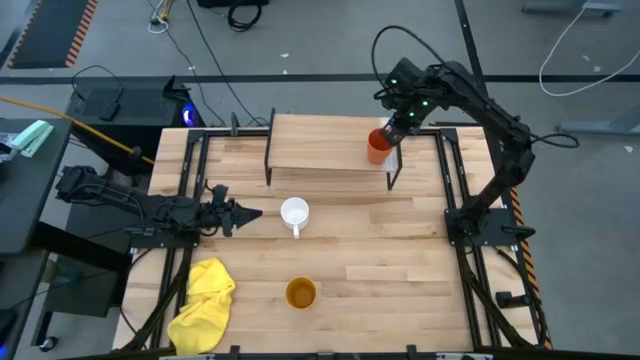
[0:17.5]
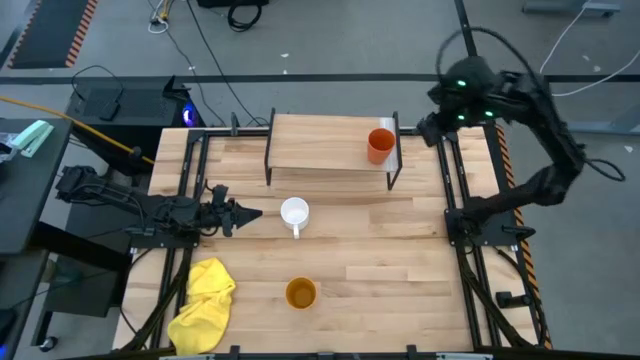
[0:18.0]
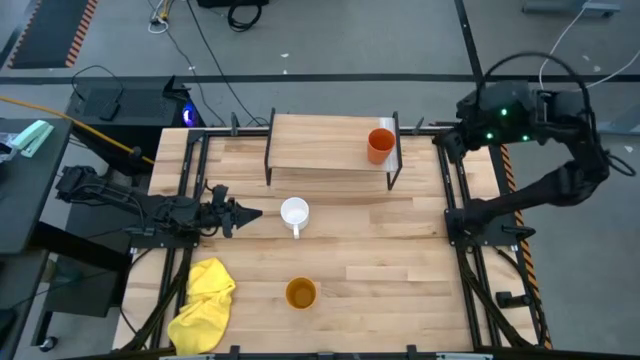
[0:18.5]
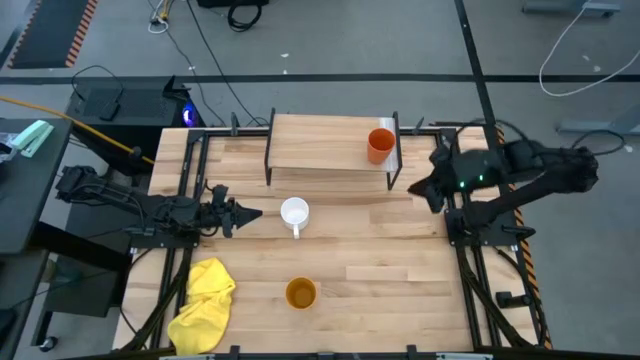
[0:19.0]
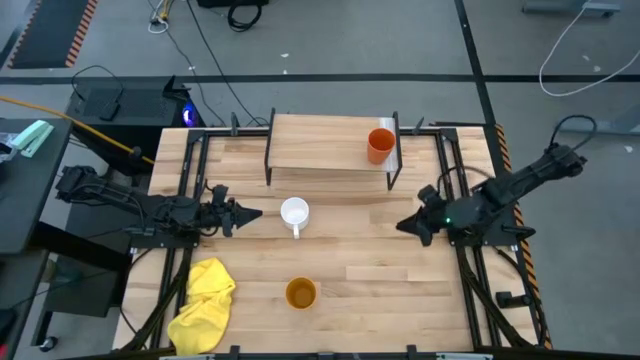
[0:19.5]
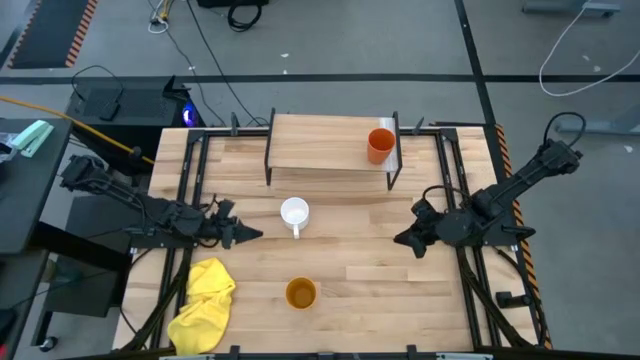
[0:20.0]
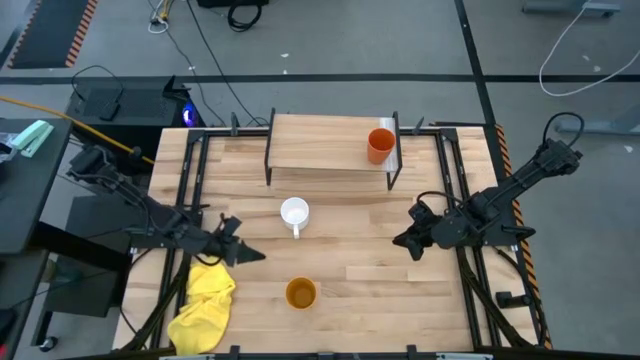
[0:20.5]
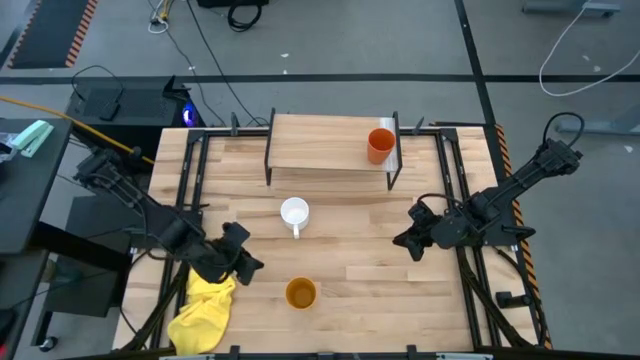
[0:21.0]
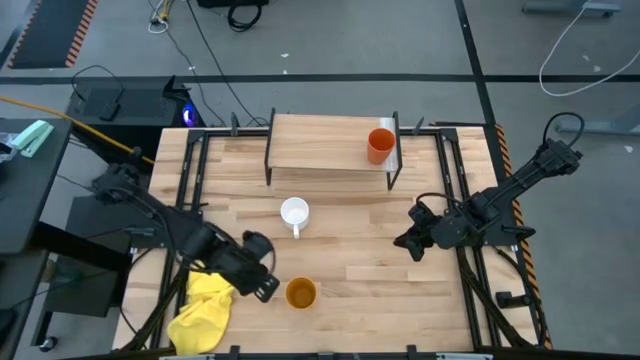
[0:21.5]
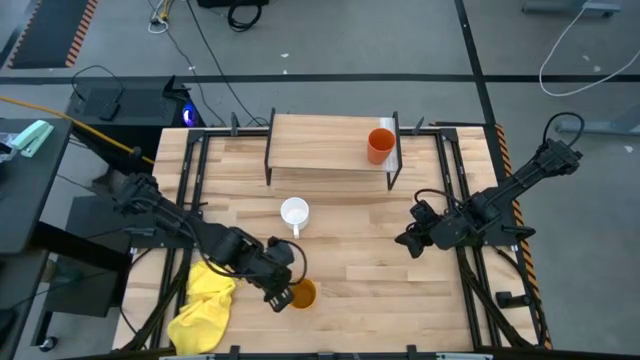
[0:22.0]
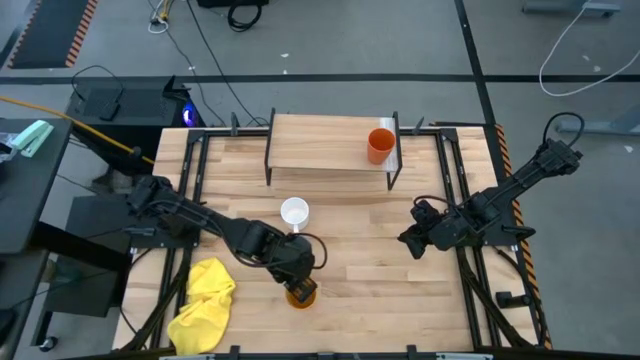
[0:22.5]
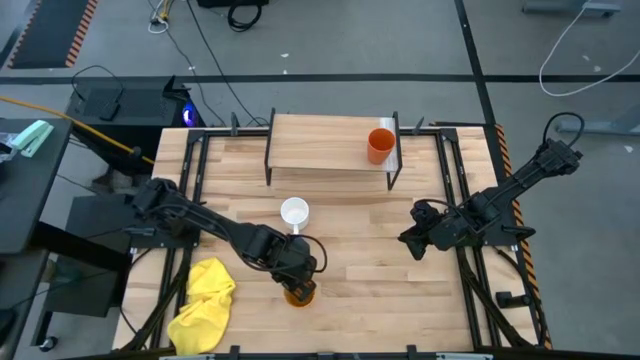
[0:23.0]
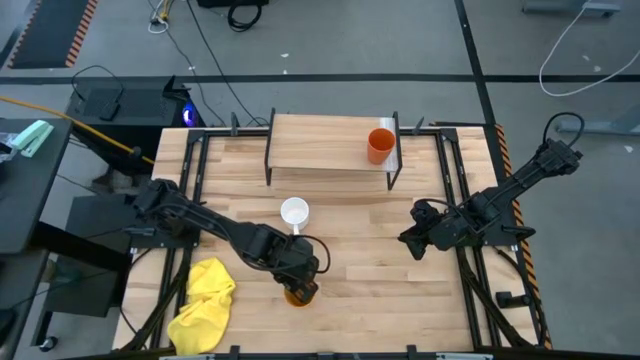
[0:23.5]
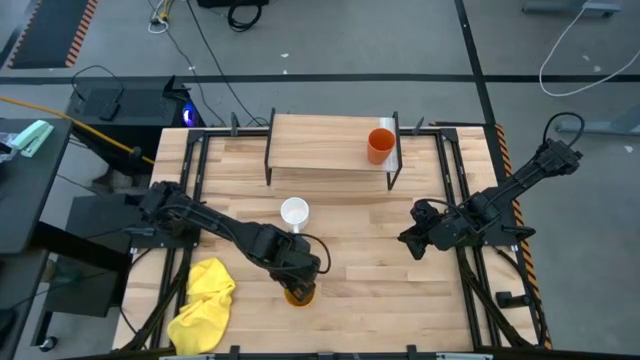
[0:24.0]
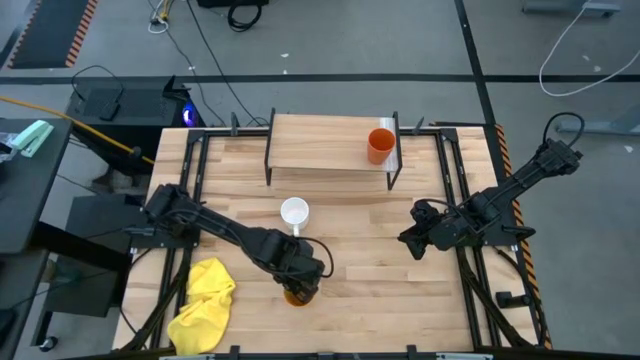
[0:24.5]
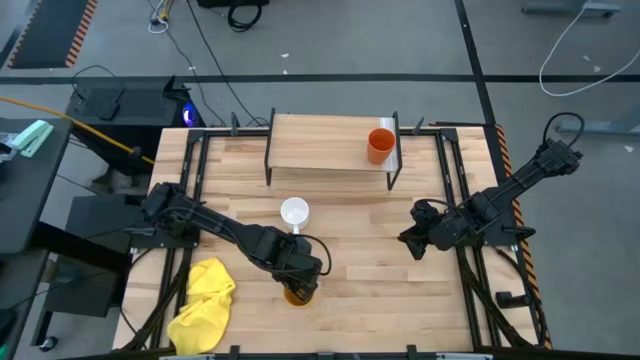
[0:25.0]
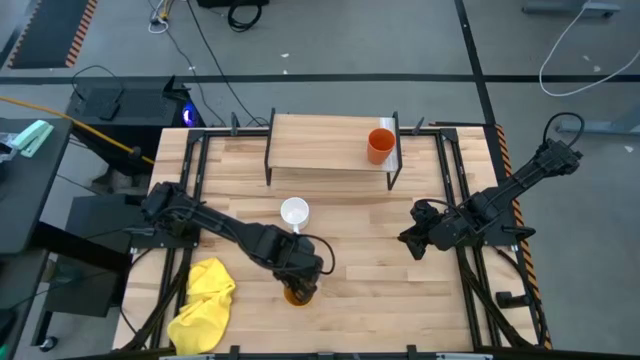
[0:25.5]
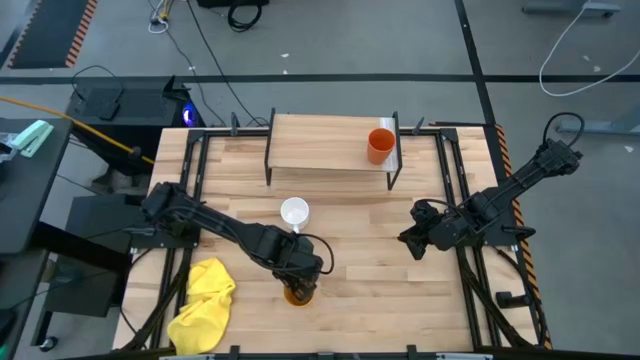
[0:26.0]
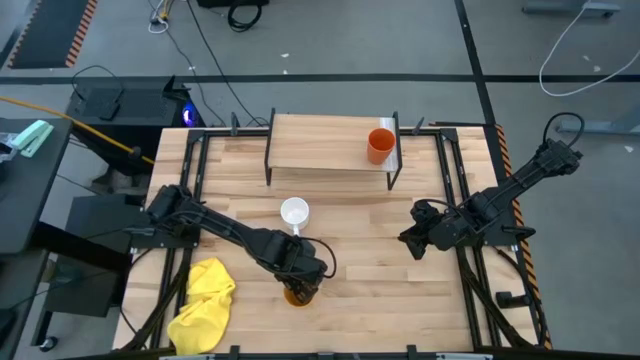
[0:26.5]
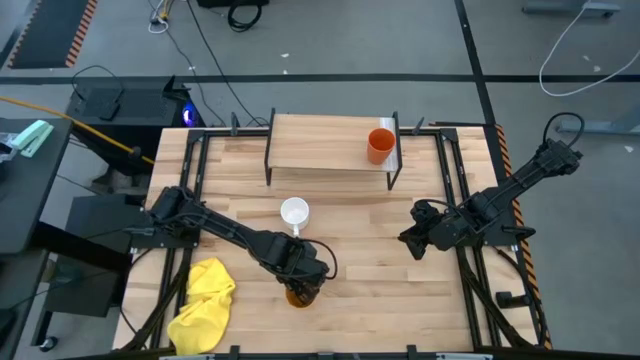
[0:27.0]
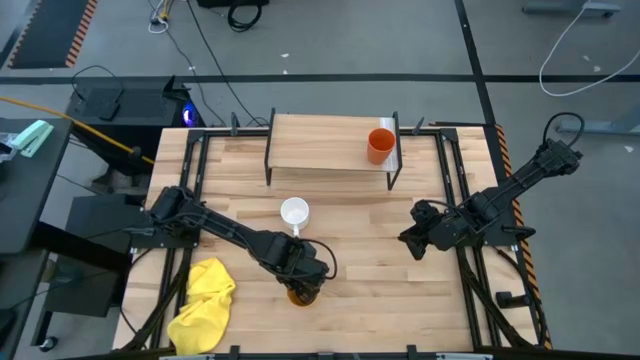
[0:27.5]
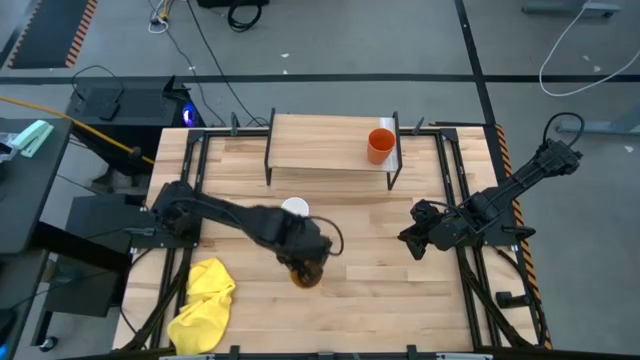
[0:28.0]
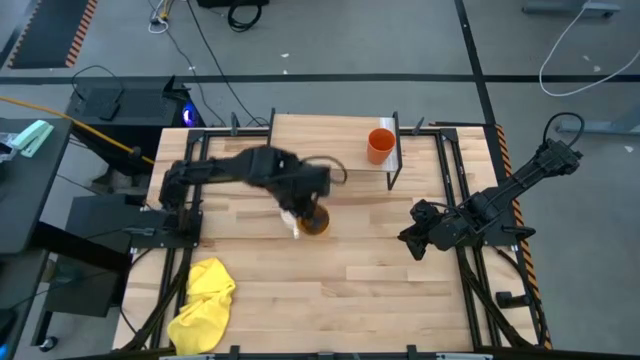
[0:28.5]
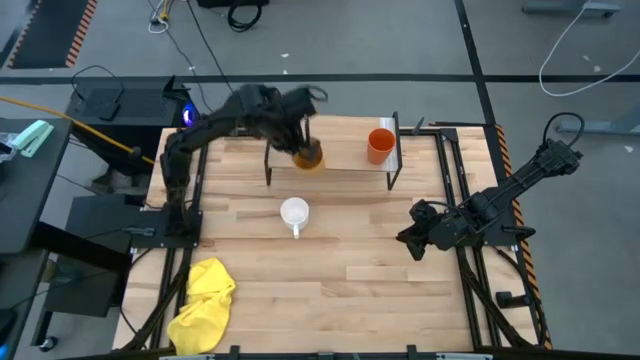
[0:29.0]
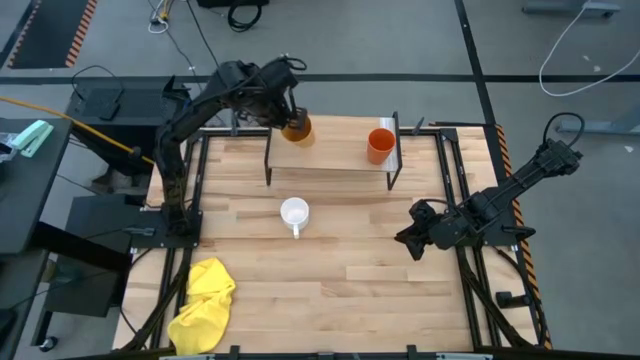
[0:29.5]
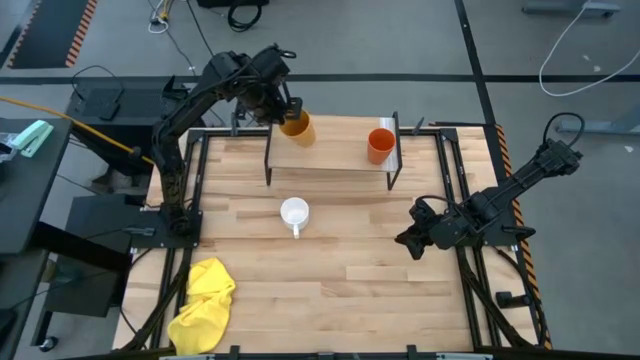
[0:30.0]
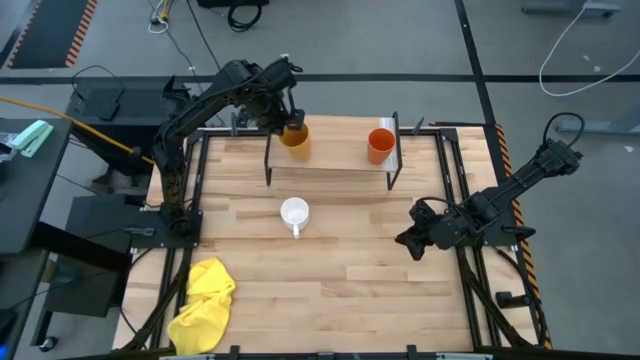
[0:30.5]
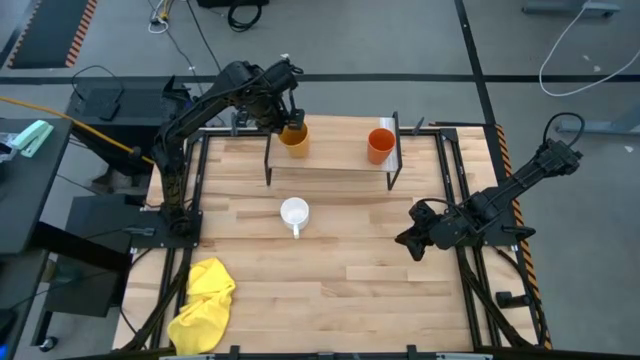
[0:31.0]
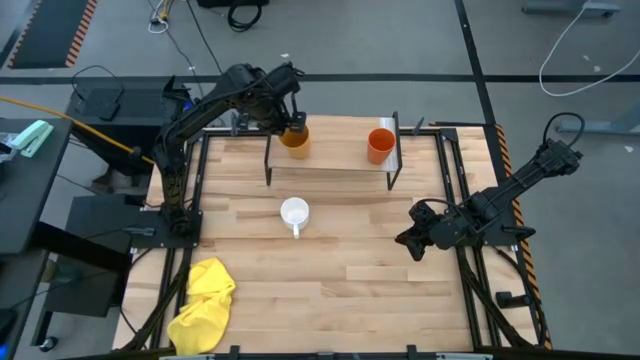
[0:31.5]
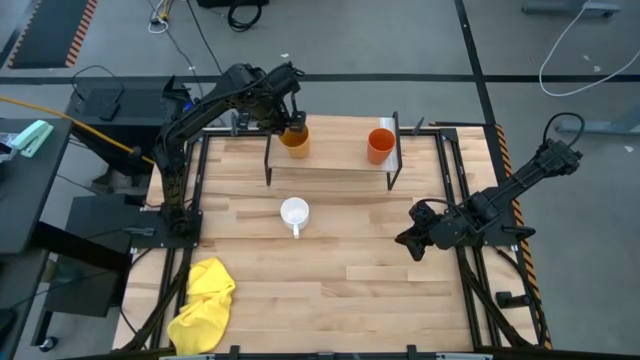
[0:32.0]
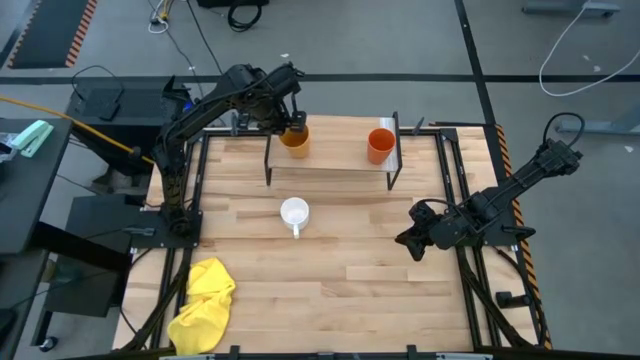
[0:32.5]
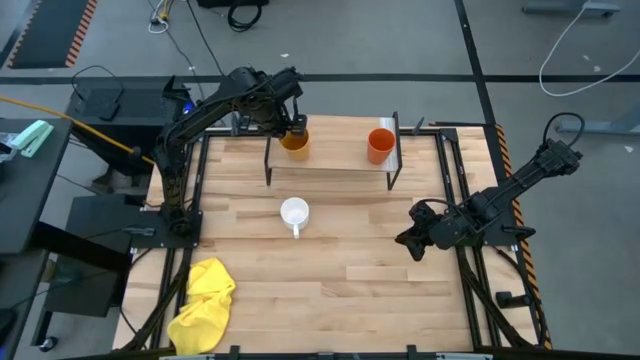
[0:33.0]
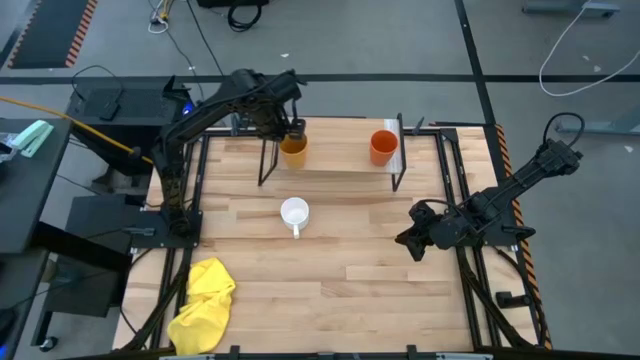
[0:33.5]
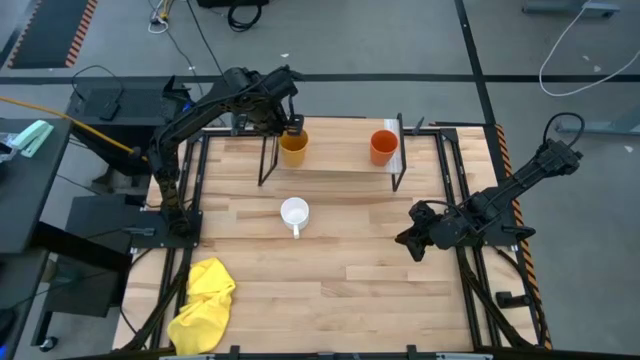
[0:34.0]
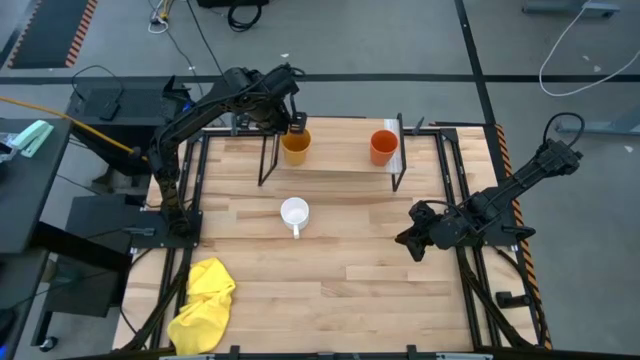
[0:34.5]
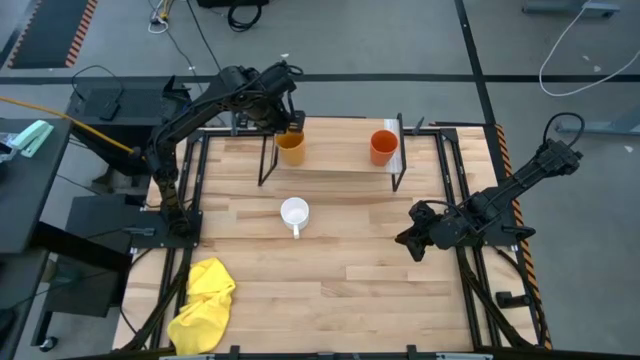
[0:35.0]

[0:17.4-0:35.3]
Task: Stack small to large cups/mugs on shelf
Put the yellow cup on the shelf

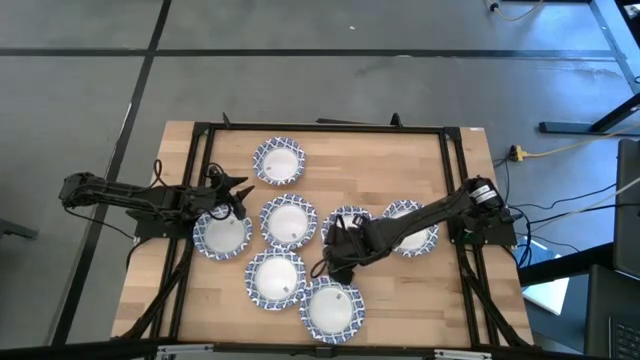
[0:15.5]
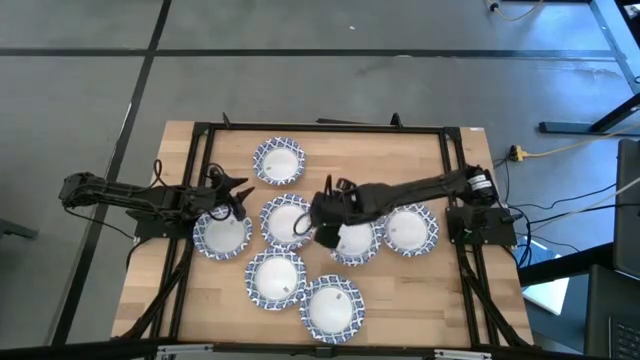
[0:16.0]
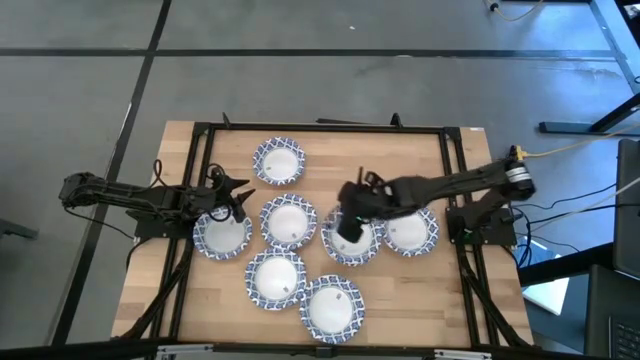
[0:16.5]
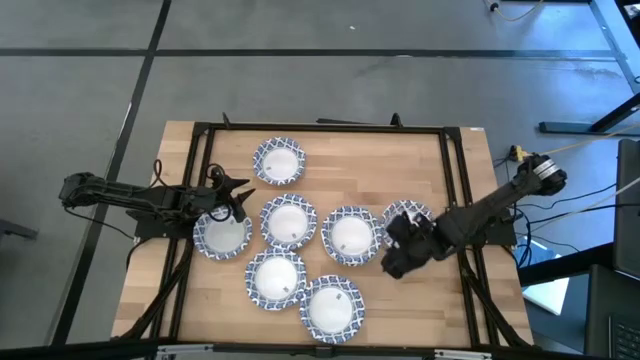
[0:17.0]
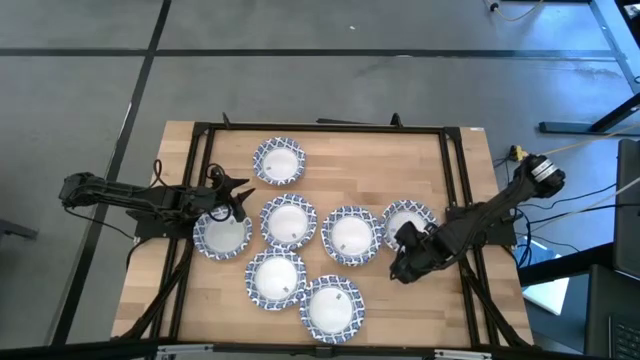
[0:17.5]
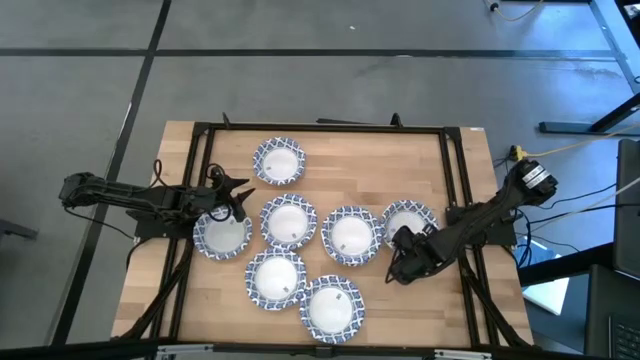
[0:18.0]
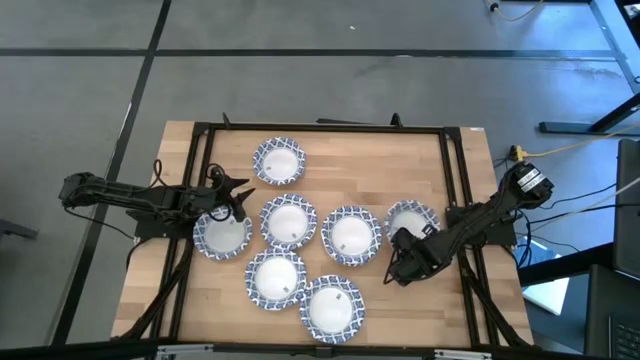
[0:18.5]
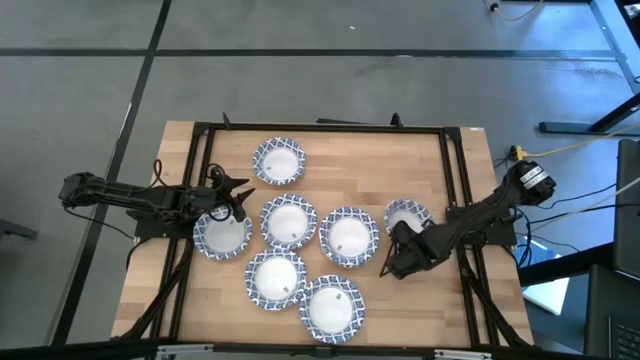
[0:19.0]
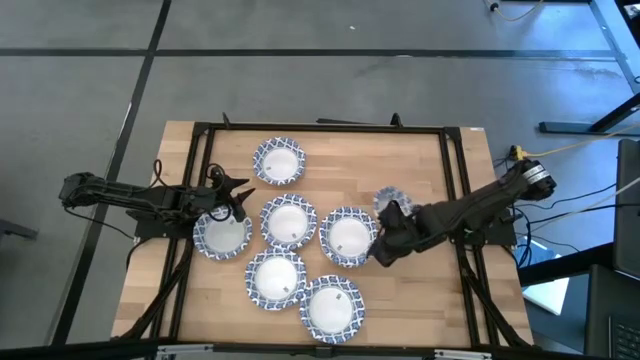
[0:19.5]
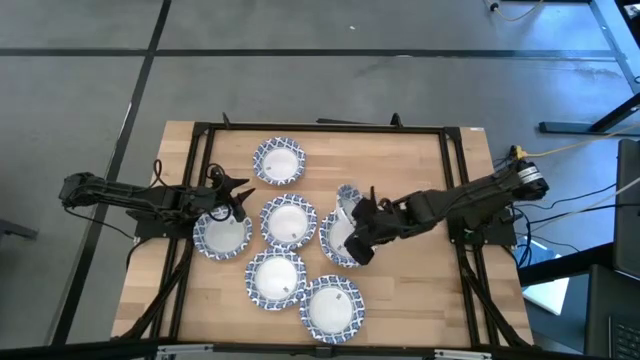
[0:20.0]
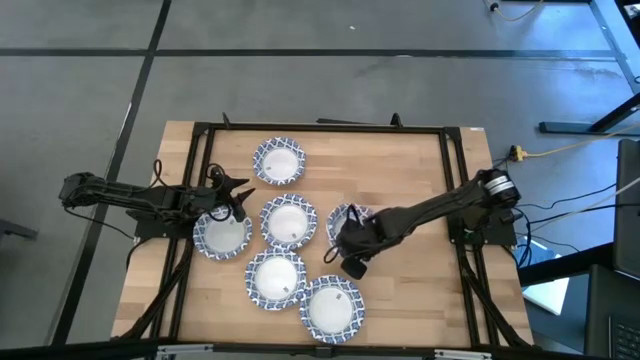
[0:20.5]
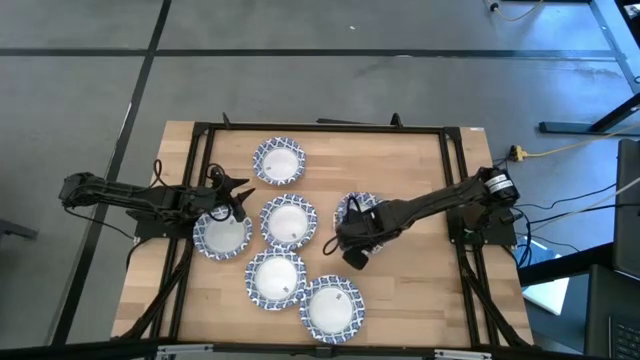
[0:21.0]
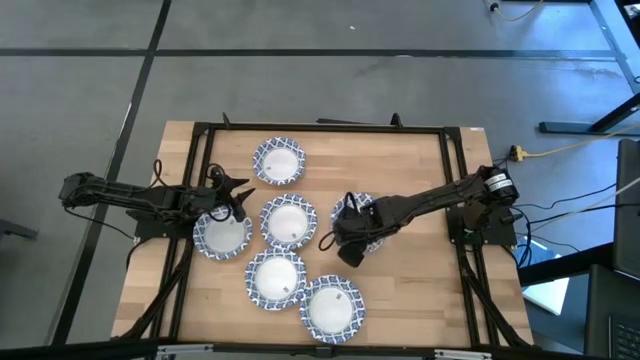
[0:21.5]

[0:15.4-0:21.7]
Task: Nest bowls inside each other
Stack the white patterned bowls on top of the other white patterned bowls
